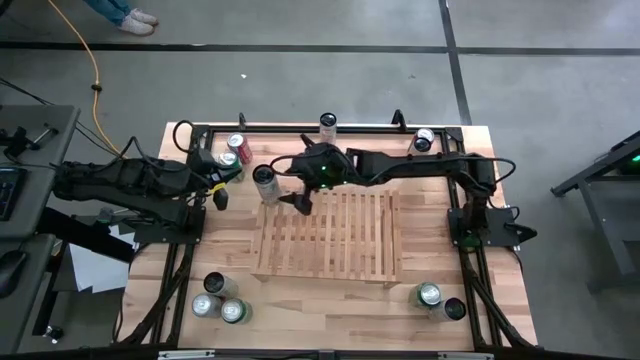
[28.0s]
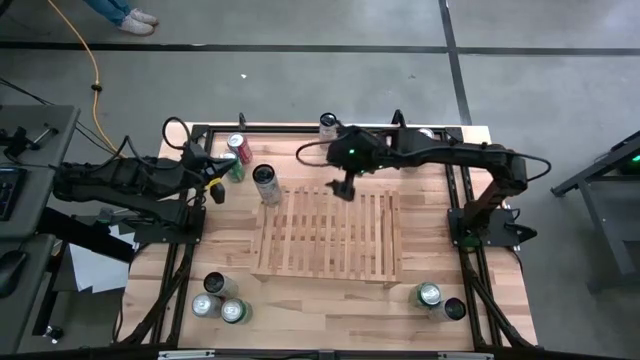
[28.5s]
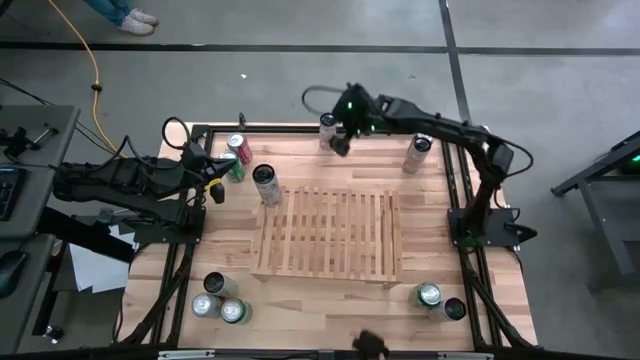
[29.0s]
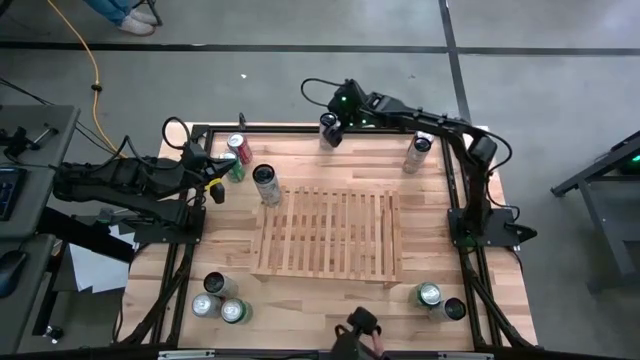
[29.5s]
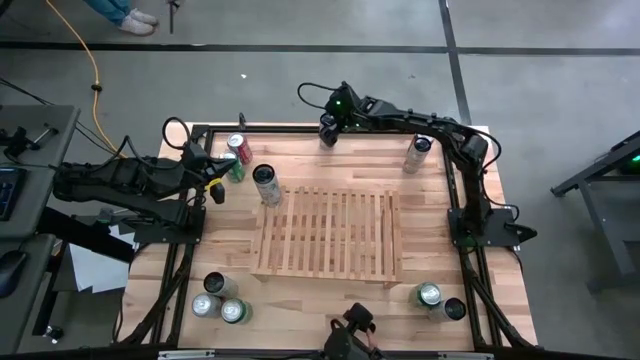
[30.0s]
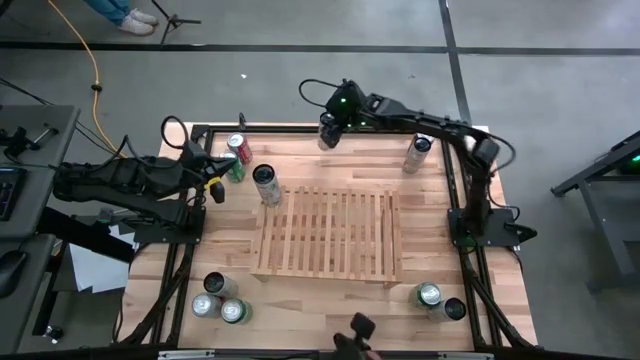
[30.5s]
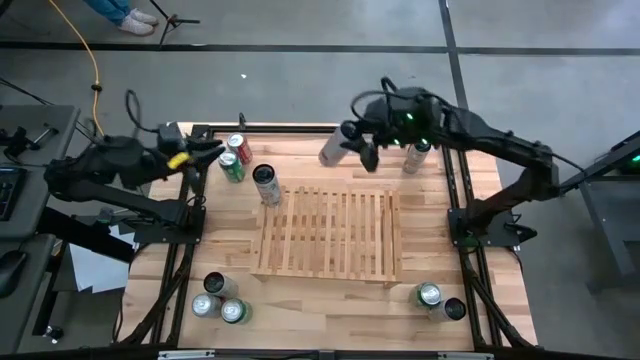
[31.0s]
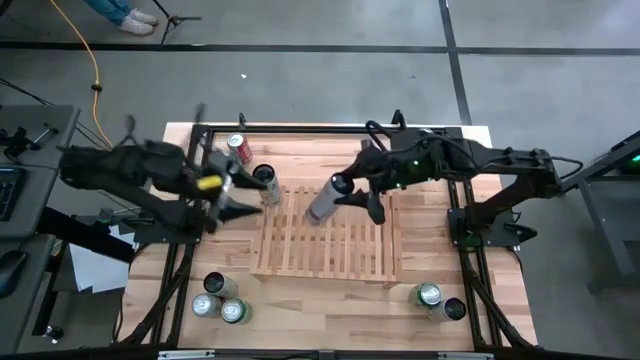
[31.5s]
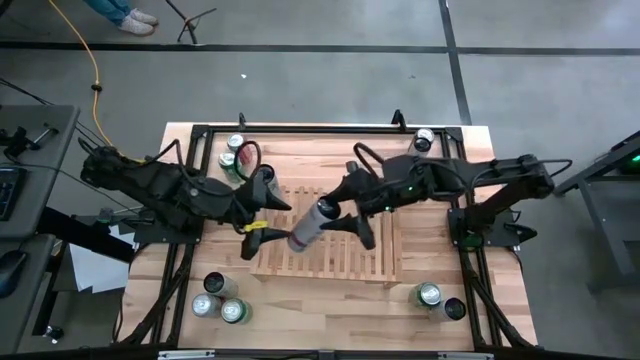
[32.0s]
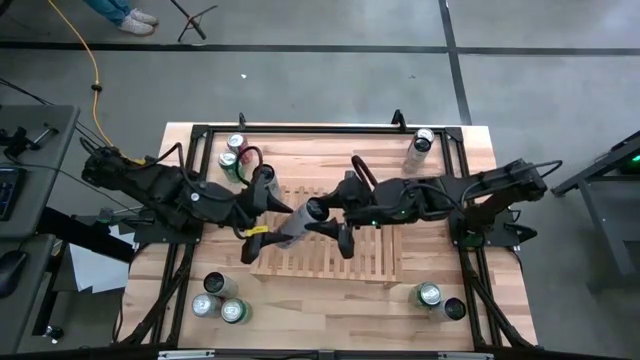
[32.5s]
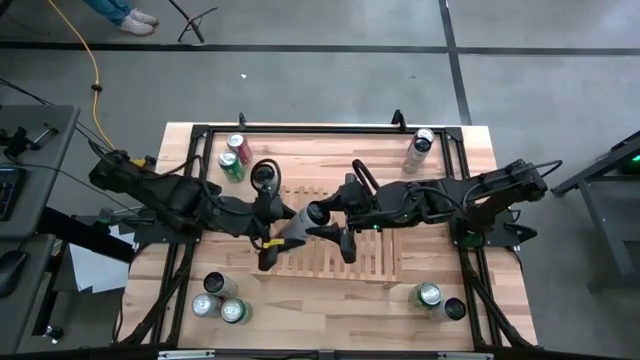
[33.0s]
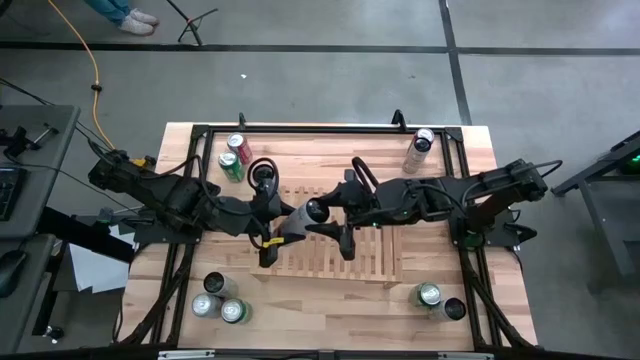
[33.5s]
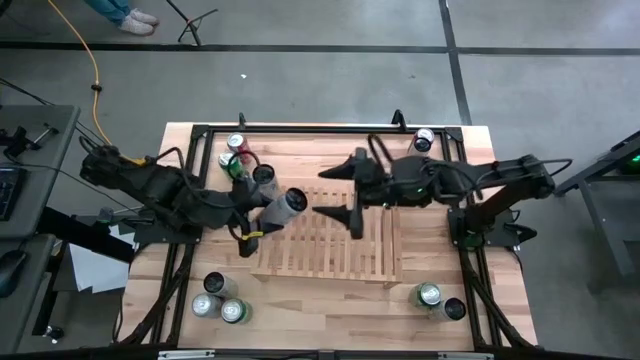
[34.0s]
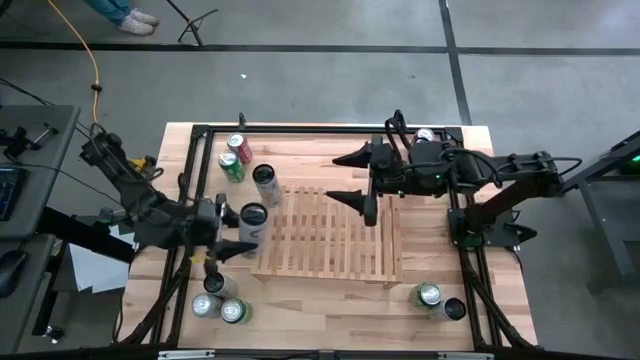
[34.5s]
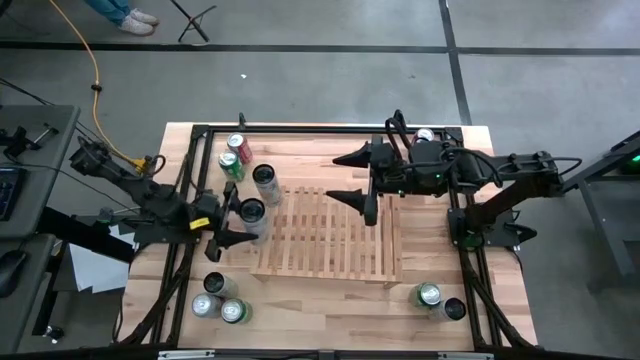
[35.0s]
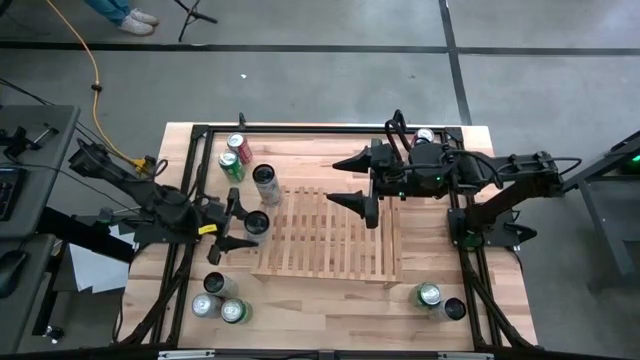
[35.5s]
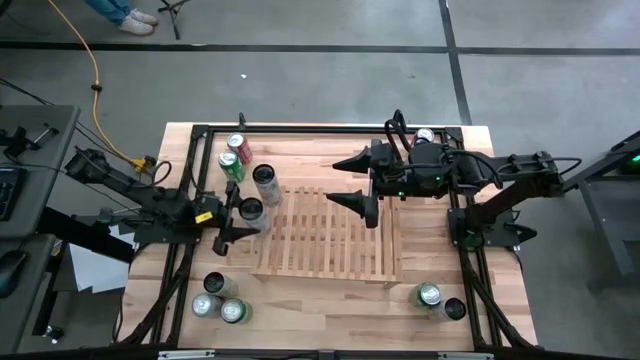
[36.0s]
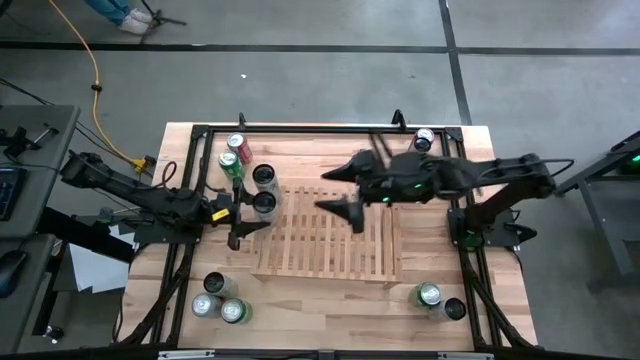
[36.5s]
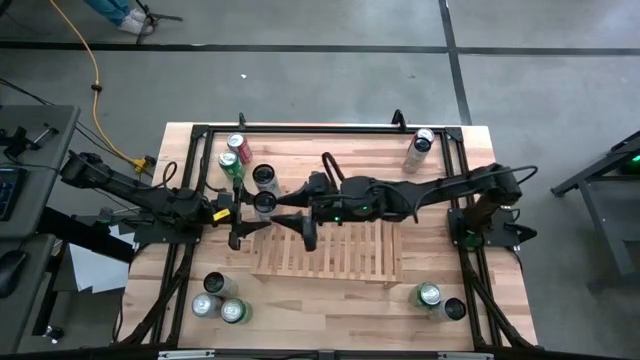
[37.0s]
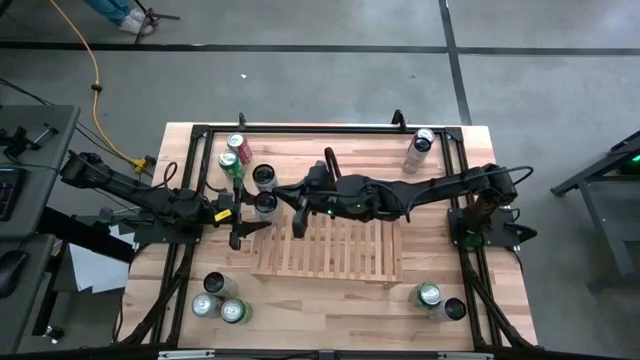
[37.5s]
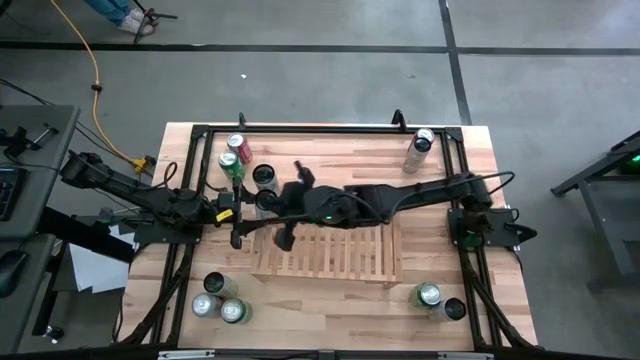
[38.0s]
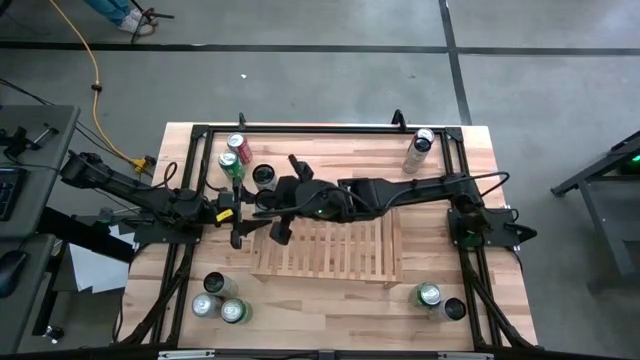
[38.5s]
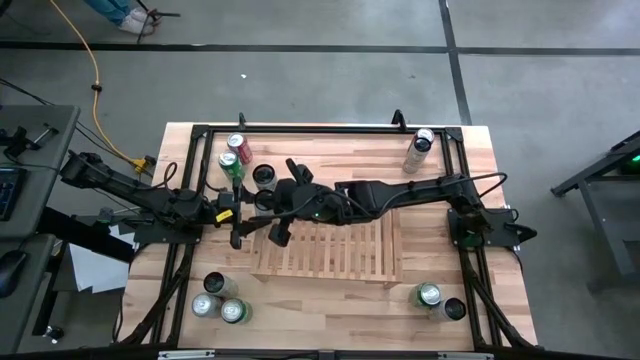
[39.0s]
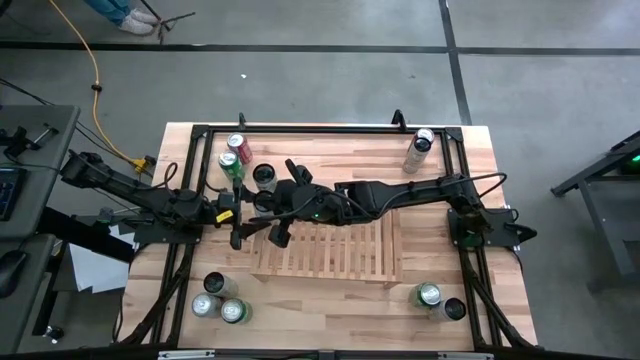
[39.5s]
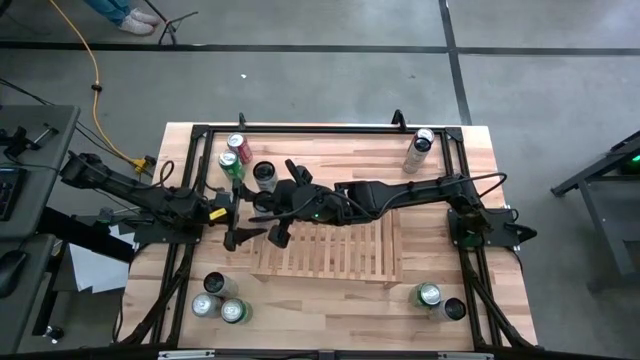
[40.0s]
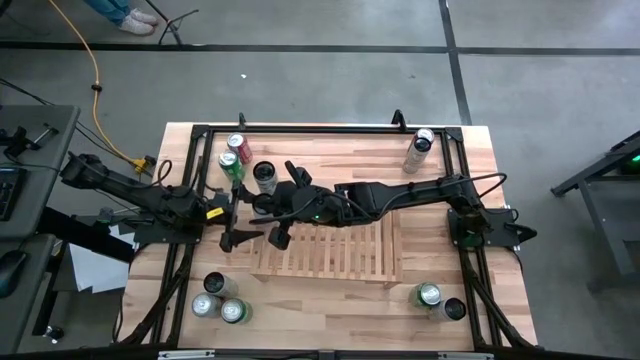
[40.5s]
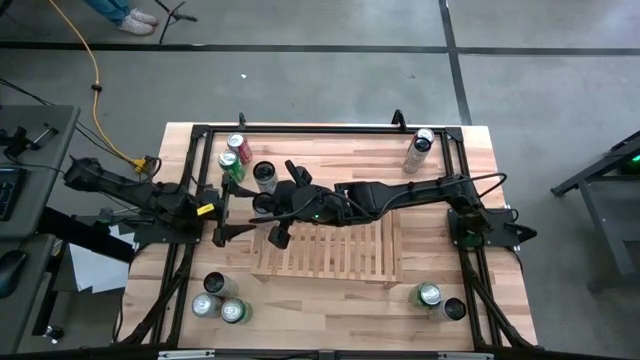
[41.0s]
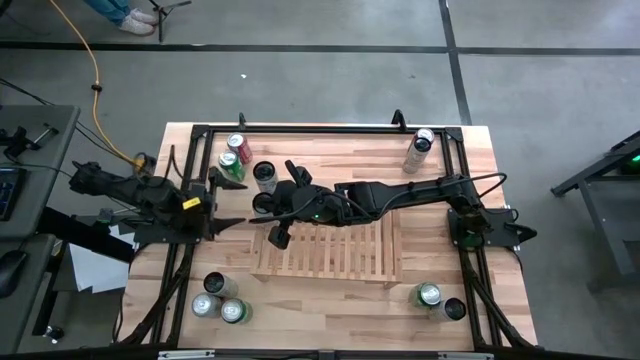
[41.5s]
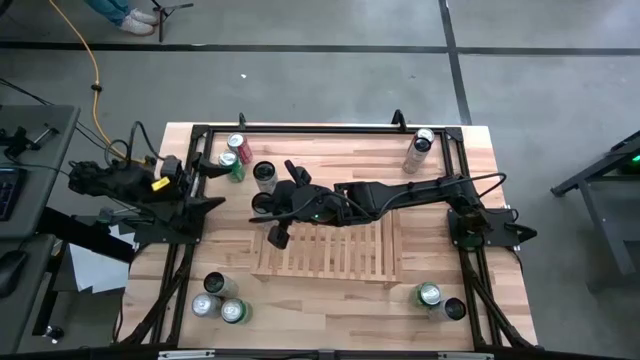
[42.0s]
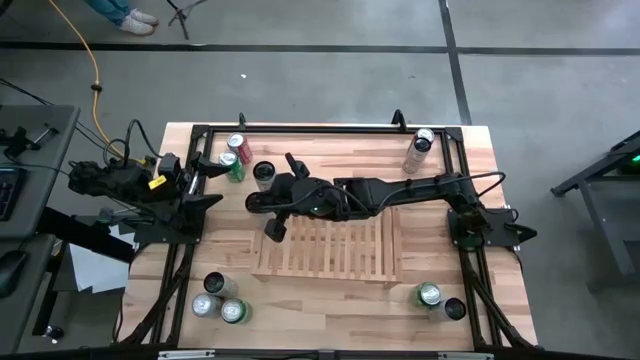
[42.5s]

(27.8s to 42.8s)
Task: Place canned beverage on shelf
Put the top white pink soda can aligned with other white pink soda can on the shelf

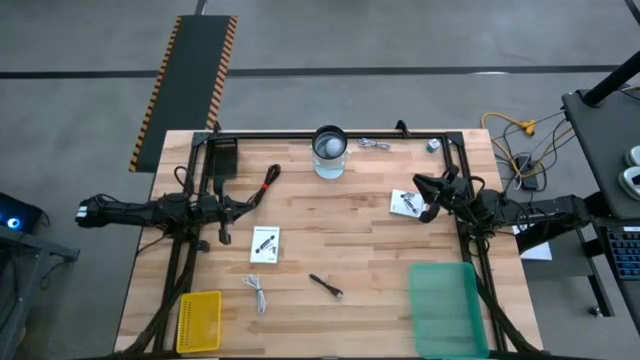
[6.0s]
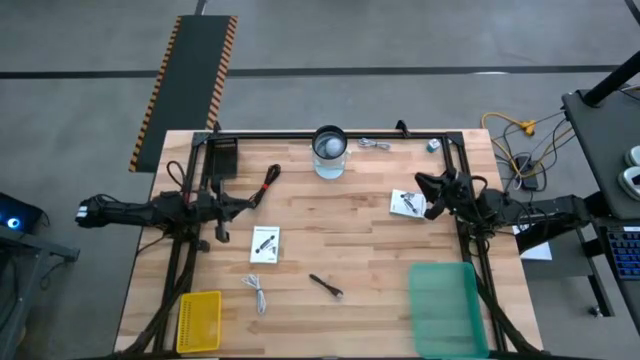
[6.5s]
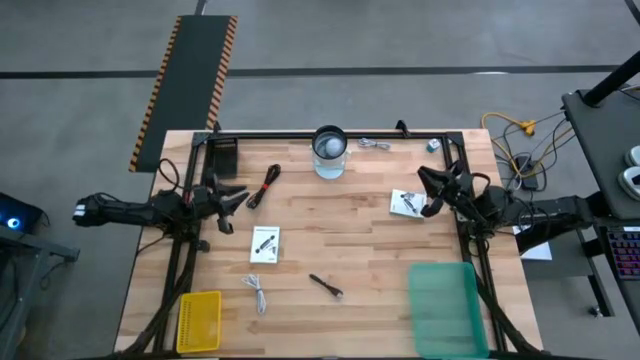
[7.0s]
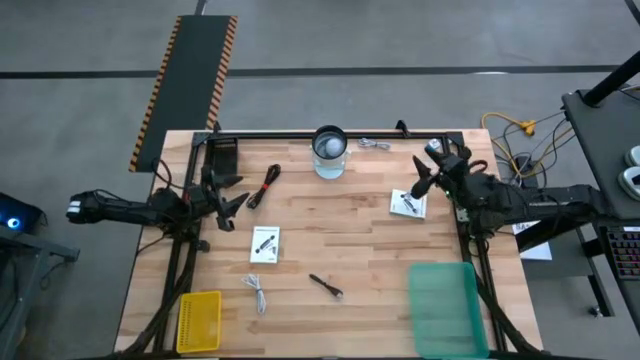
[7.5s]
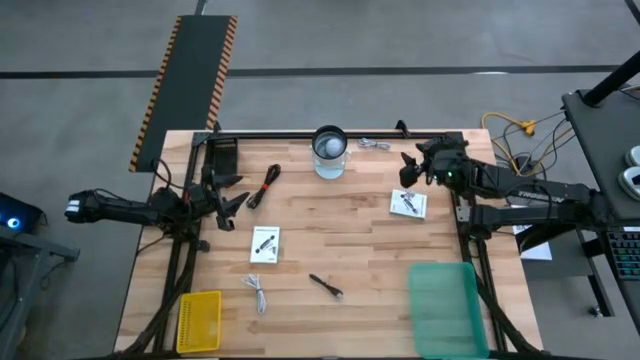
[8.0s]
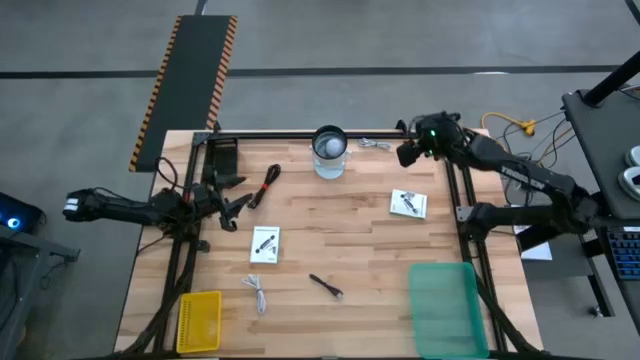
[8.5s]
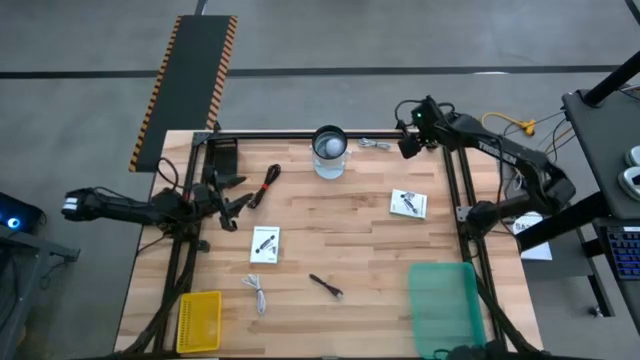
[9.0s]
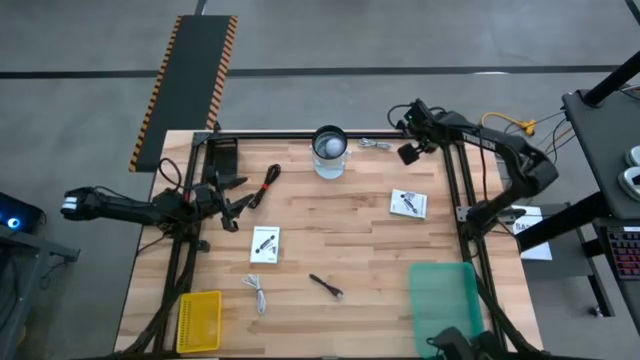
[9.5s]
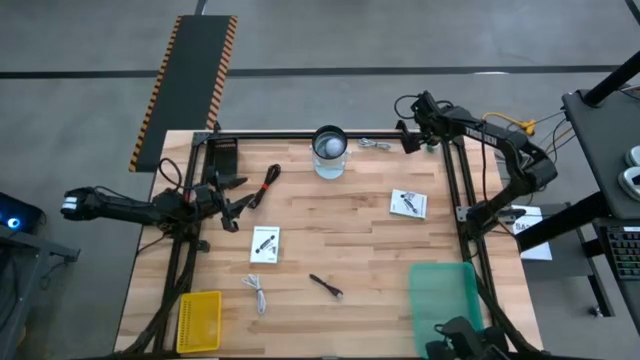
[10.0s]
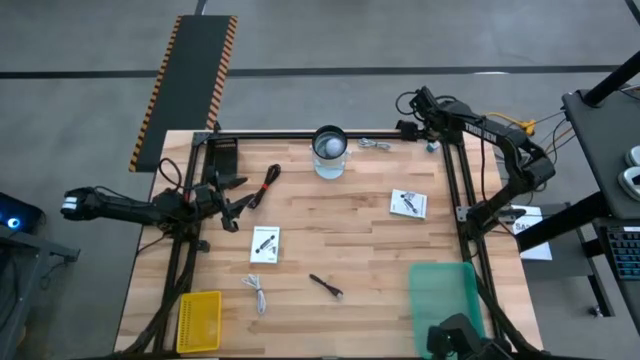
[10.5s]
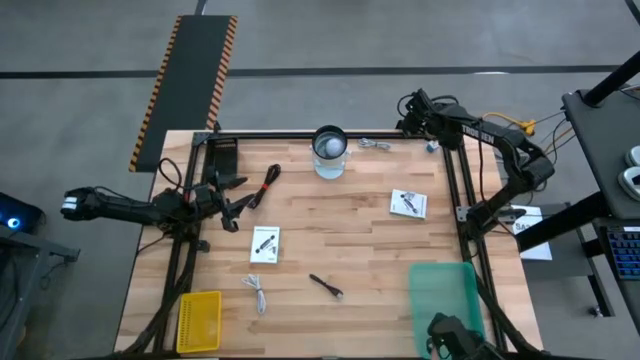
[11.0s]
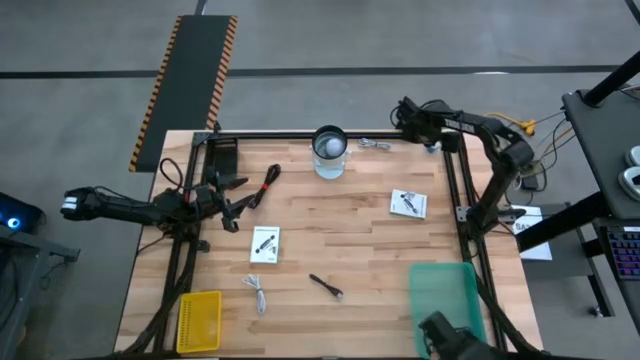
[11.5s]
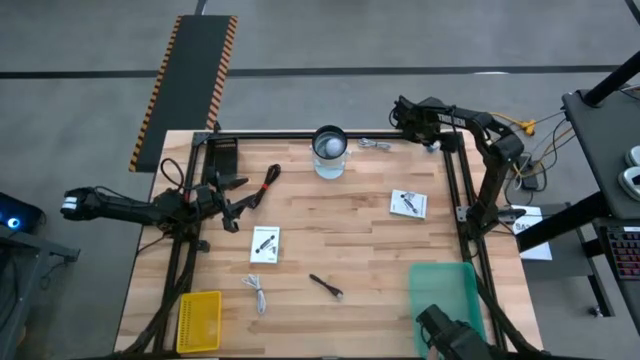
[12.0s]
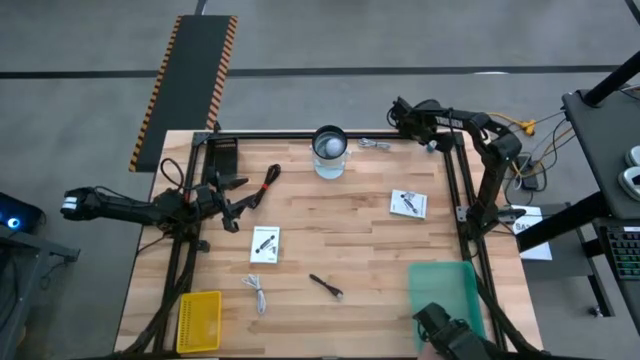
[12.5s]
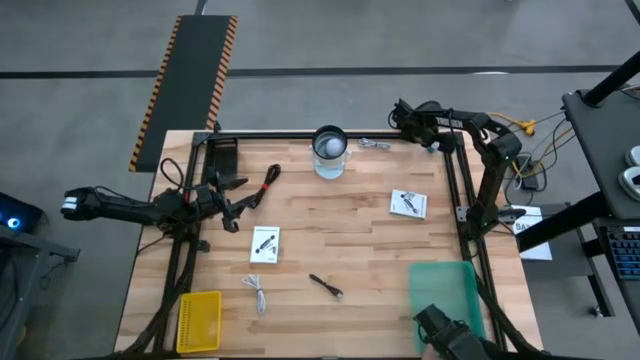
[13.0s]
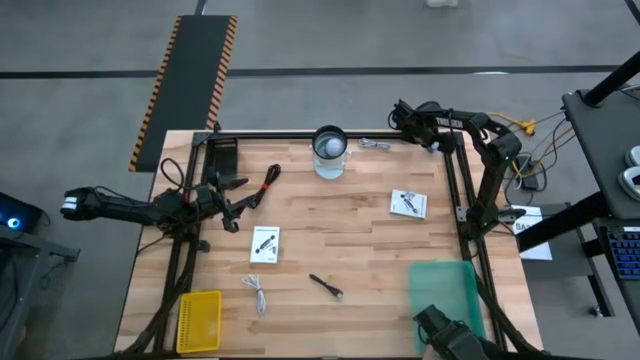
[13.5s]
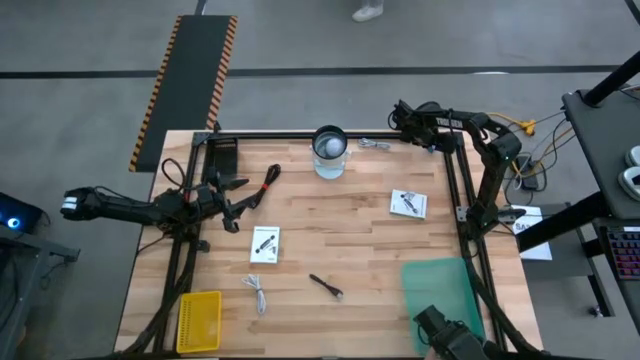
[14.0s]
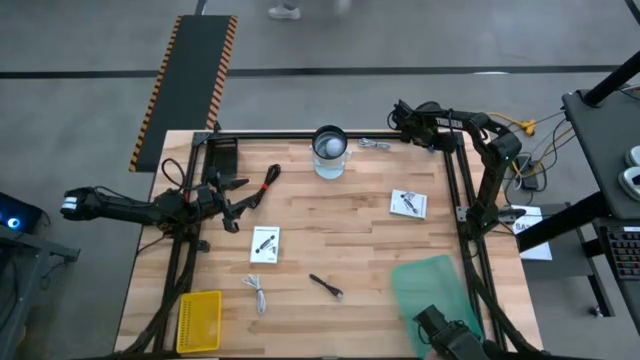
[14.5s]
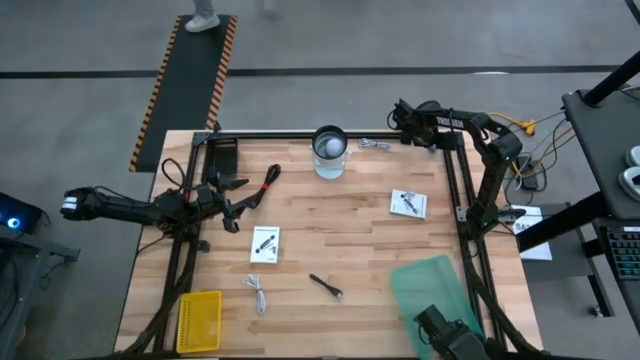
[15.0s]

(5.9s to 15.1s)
Task: Pick and place items into bin
Put the blue charger adapter into the black bin
